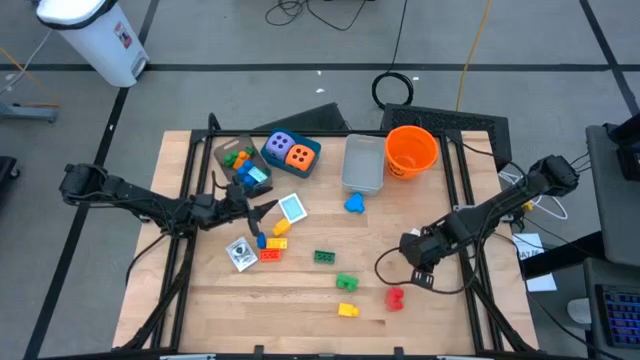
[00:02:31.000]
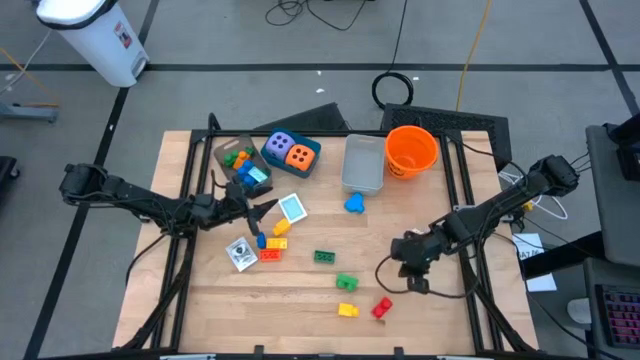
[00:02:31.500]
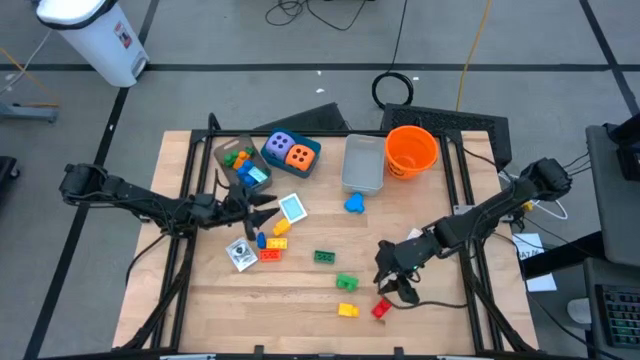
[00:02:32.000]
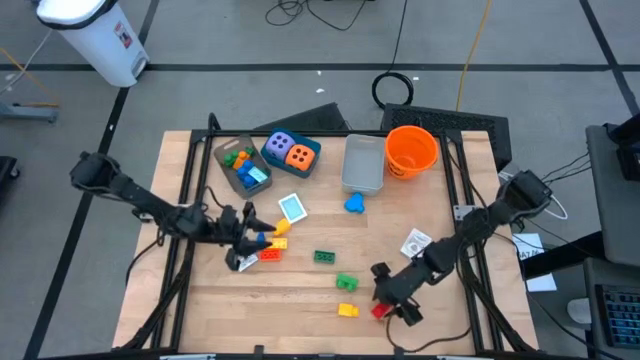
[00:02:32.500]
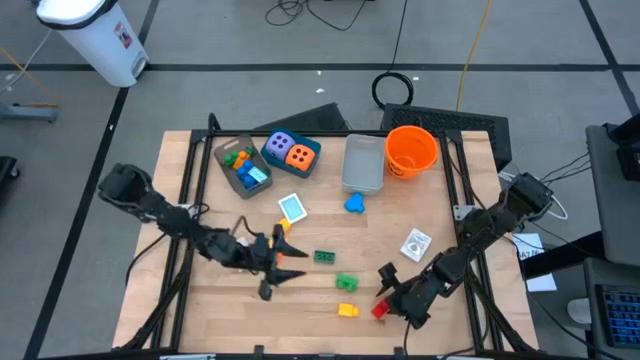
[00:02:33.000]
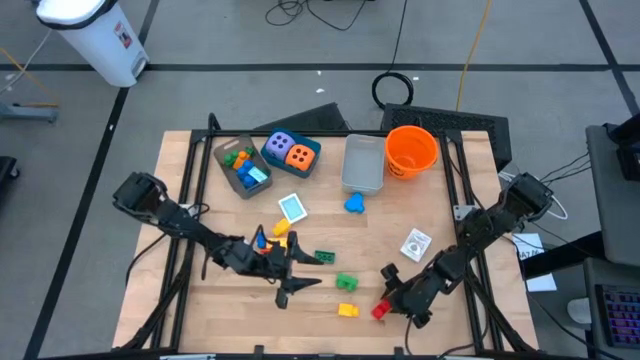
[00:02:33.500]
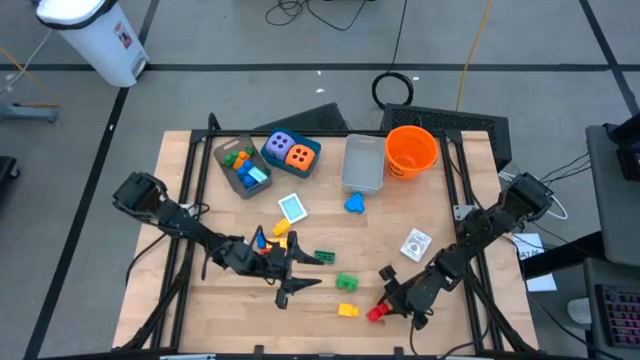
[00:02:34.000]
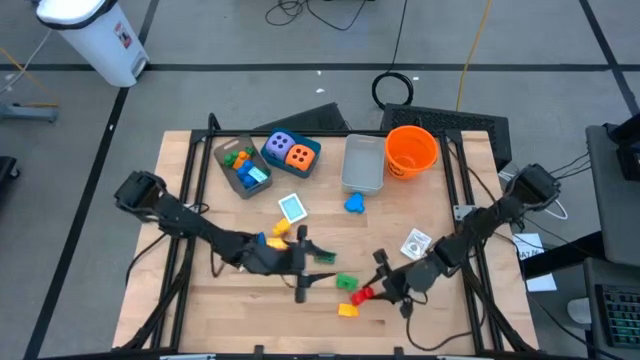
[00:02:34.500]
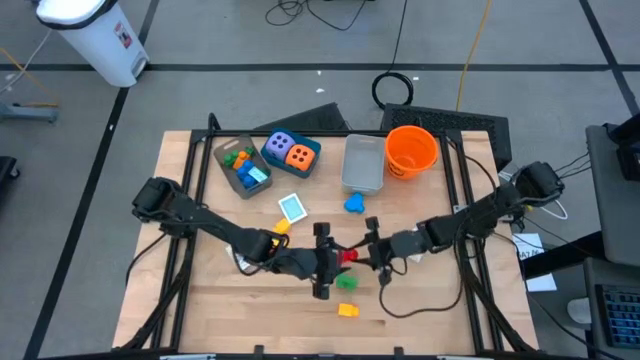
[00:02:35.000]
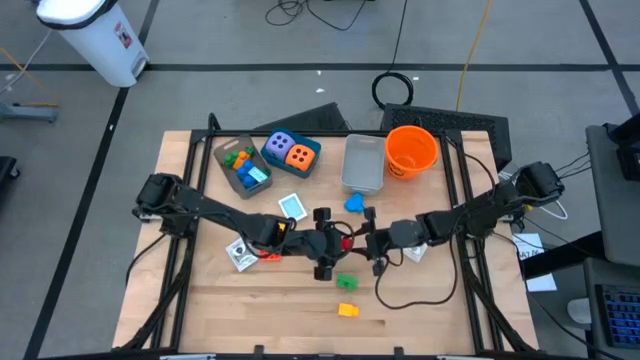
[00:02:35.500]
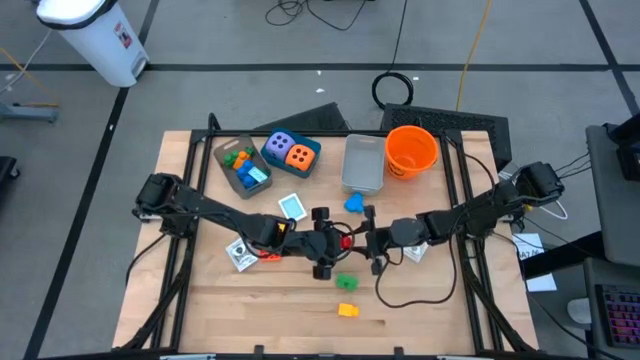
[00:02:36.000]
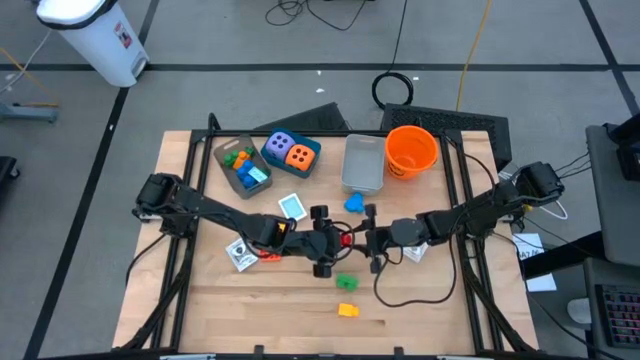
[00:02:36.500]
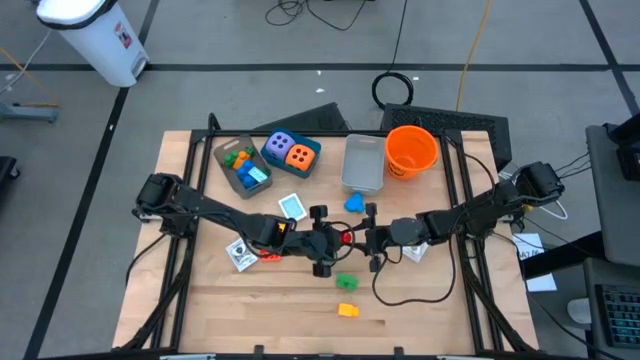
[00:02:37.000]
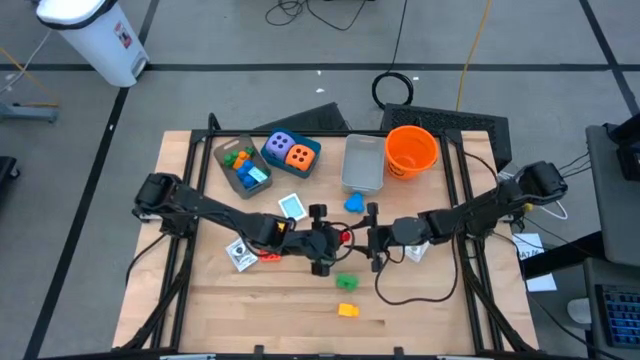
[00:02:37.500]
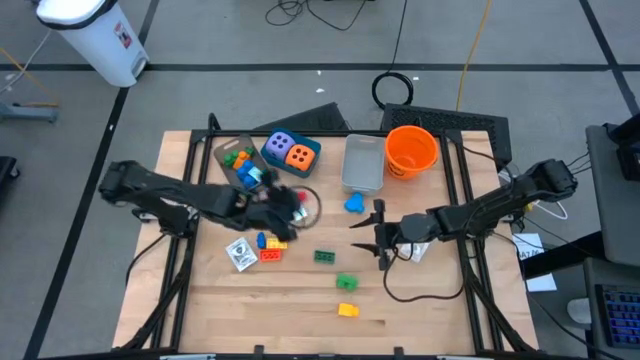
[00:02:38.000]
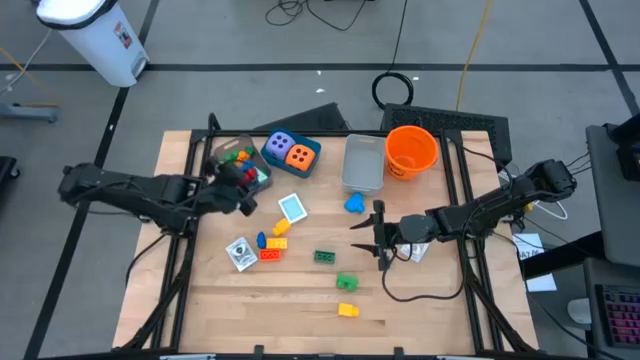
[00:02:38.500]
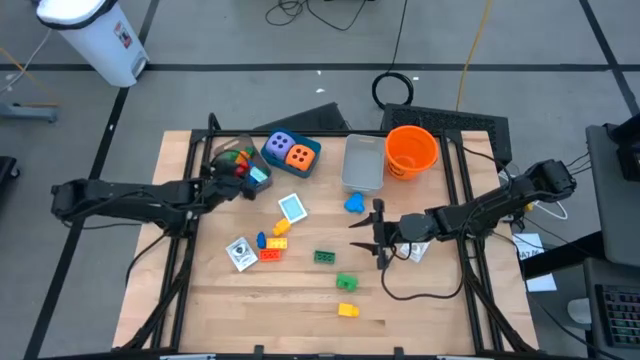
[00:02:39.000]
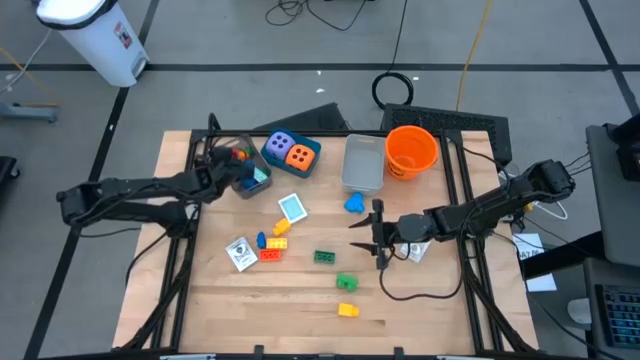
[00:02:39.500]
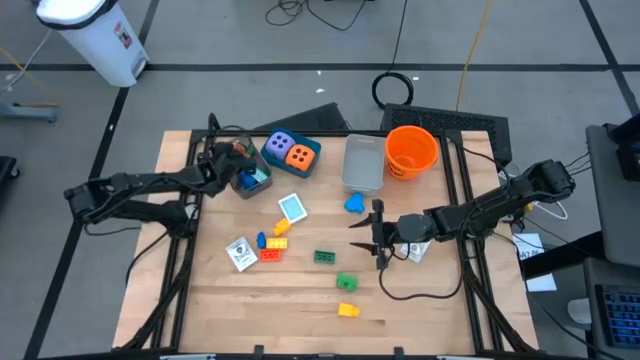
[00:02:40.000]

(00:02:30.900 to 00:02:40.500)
Task: Pick & Place Toys
Put the red game piece into the black bin

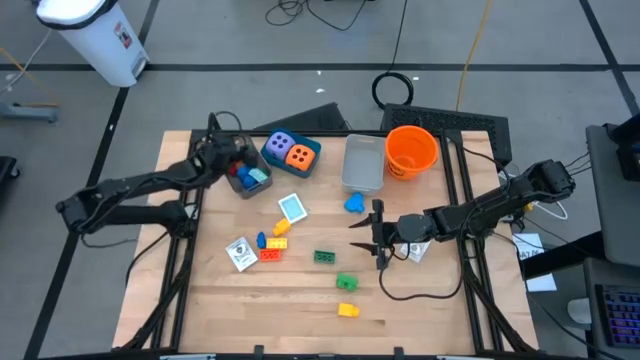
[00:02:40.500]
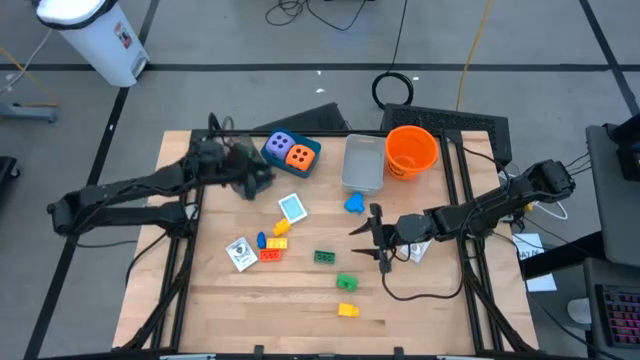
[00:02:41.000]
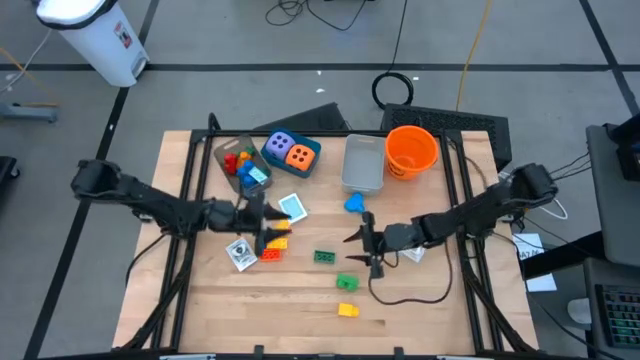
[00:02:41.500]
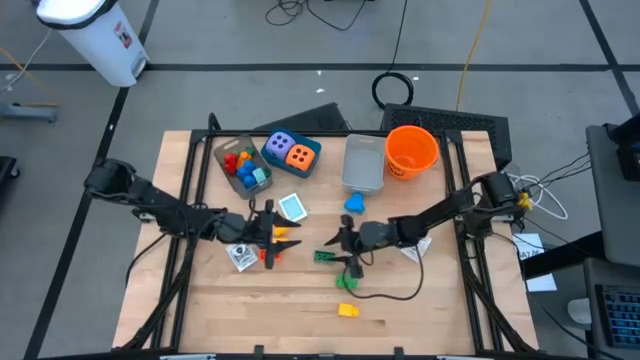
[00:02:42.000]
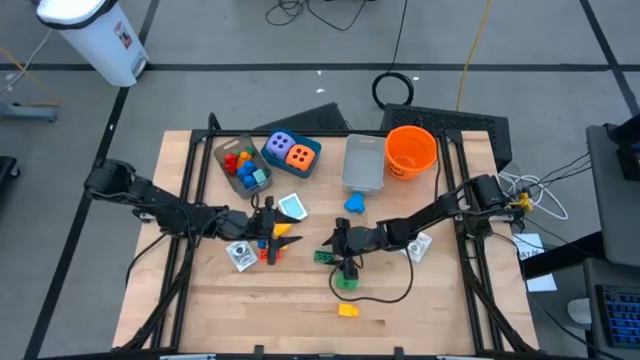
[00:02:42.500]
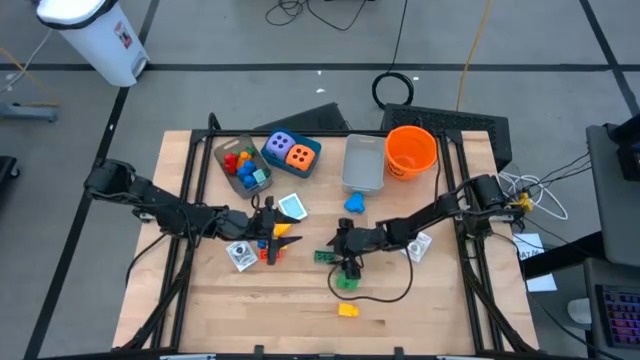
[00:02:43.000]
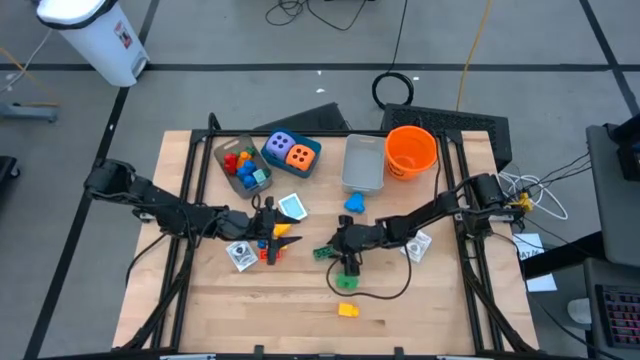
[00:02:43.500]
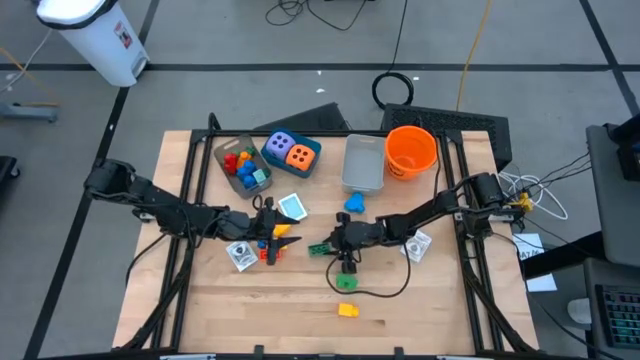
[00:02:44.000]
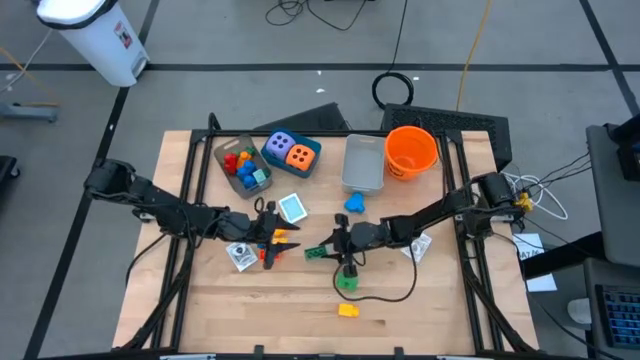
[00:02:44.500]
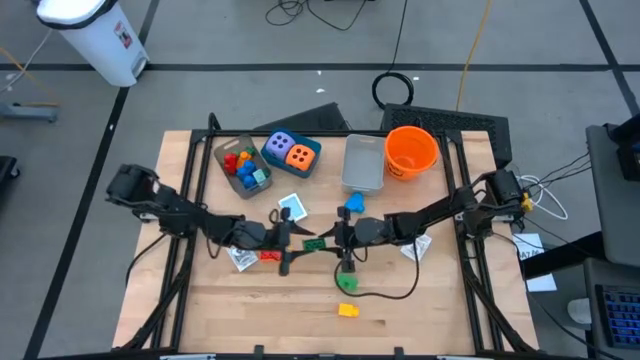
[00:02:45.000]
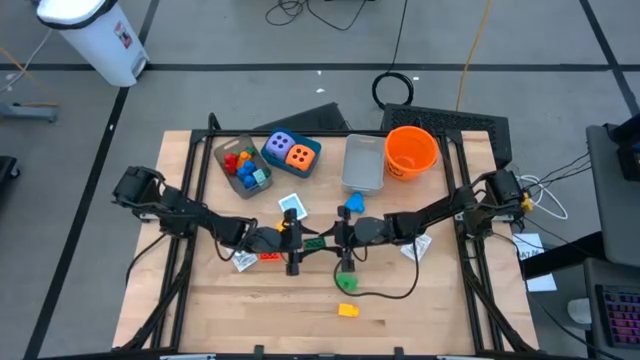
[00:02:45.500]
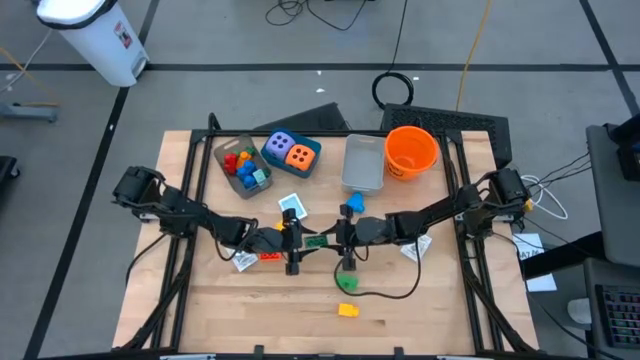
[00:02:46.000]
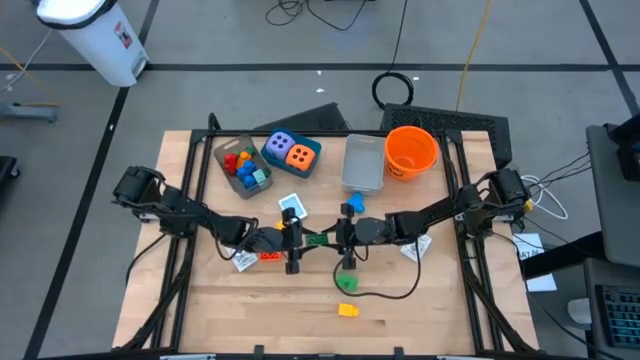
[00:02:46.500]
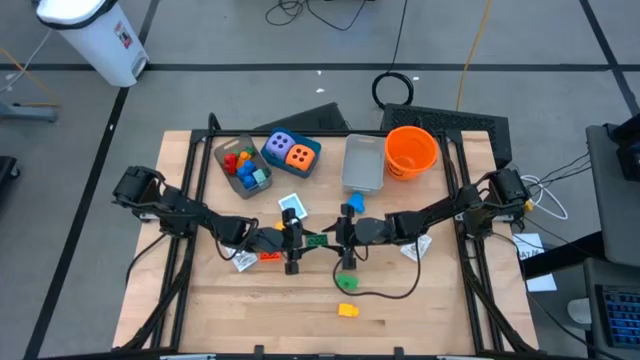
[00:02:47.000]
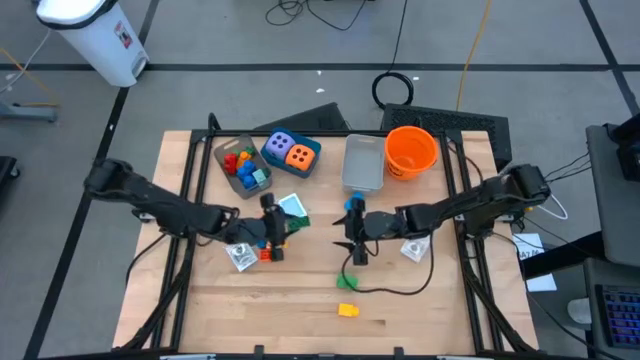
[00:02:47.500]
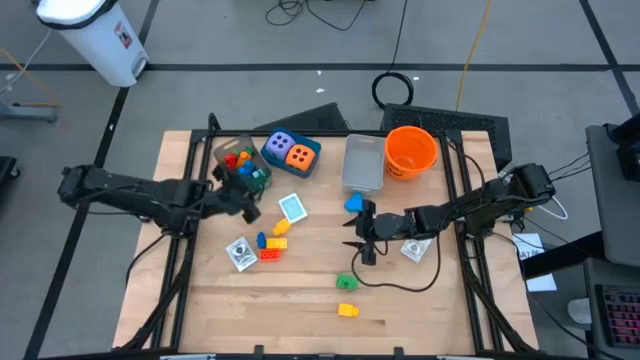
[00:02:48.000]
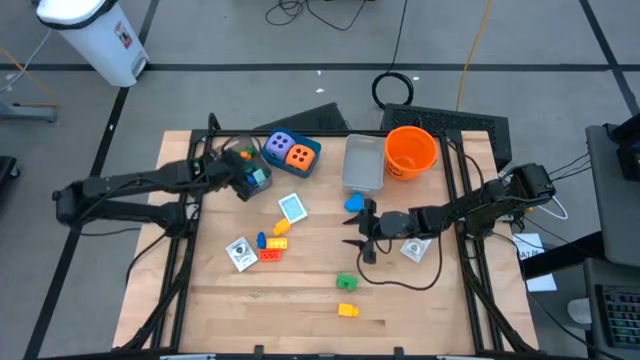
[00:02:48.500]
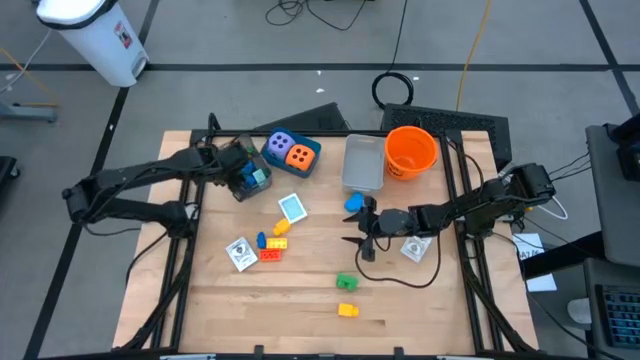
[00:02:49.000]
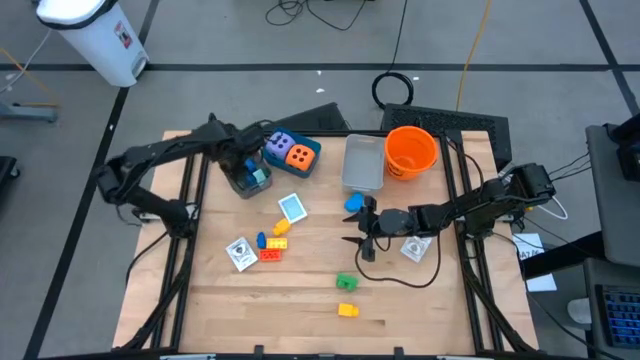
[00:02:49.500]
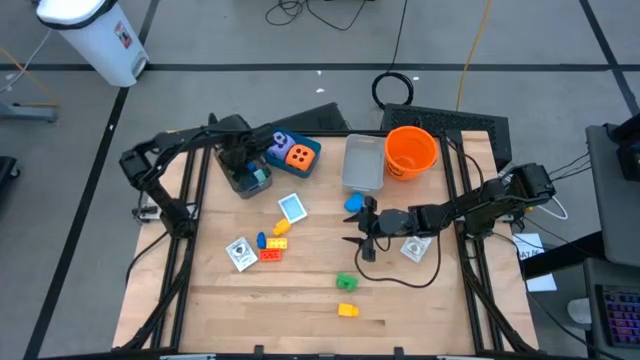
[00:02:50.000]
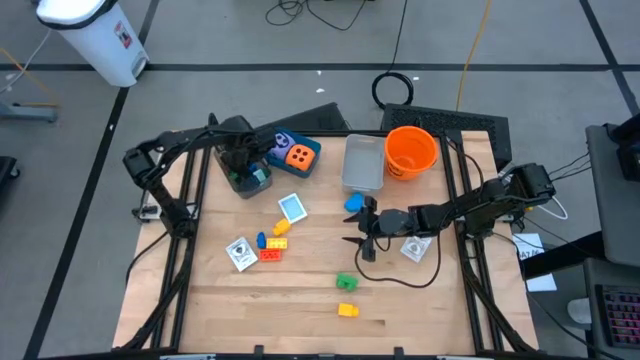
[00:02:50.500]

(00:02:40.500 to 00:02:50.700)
Put the green game piece into the black bin

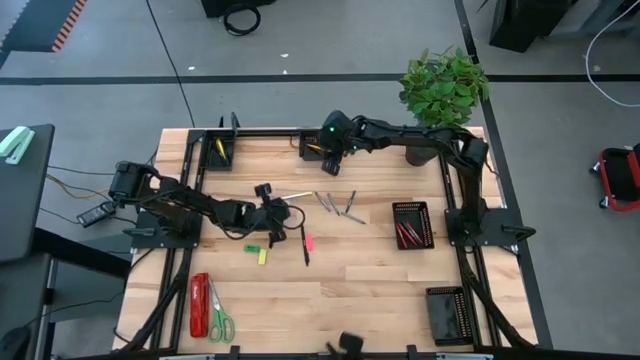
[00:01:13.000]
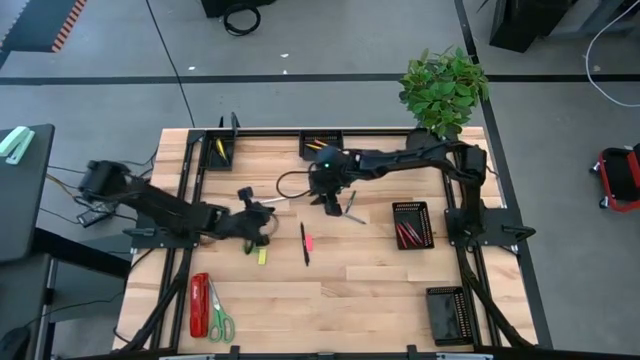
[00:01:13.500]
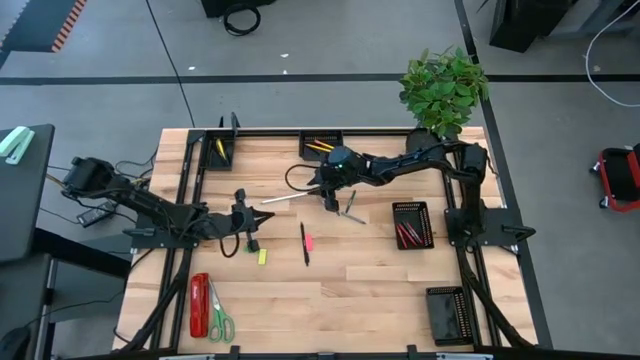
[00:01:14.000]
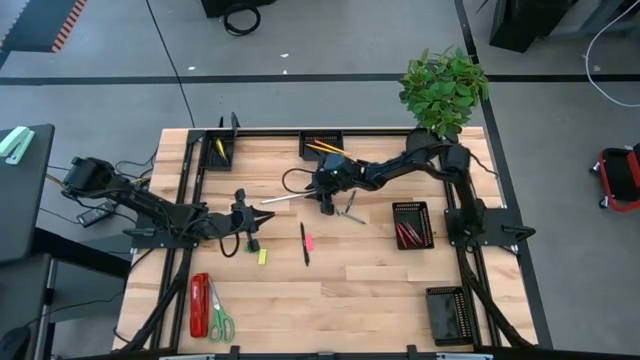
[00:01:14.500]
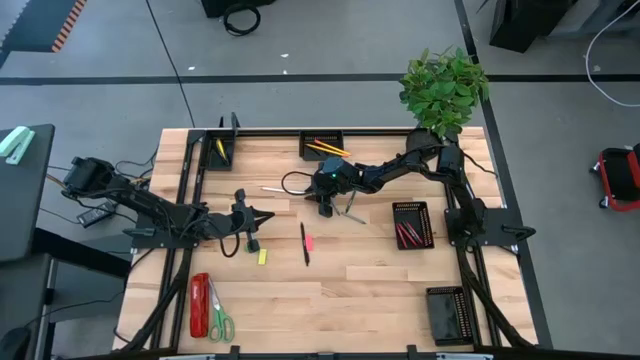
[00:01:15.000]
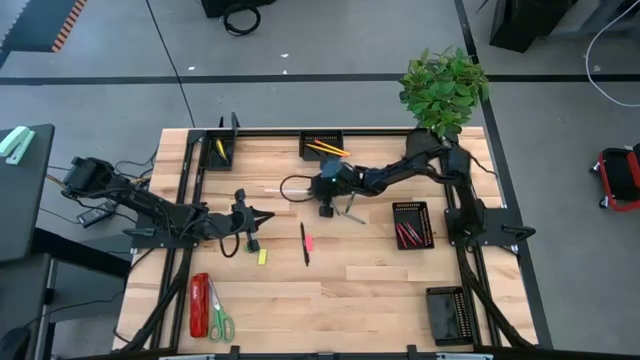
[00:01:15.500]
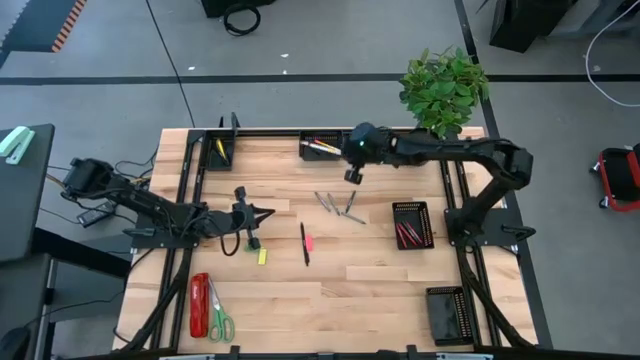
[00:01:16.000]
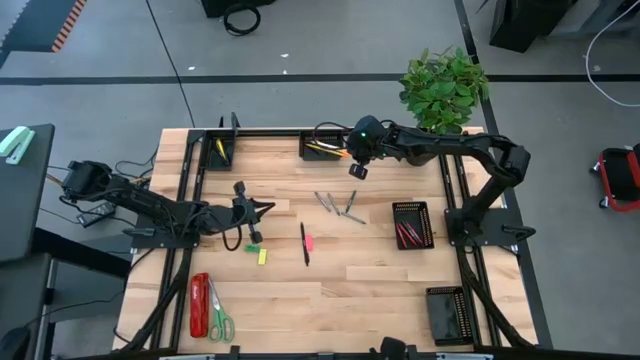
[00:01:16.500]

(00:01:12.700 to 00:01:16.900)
Task: Sort crayons/erasers/pens/pencils in bins
Put the white pencil into the top right black bin
